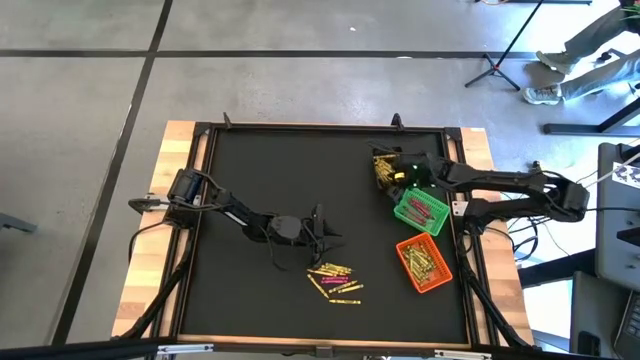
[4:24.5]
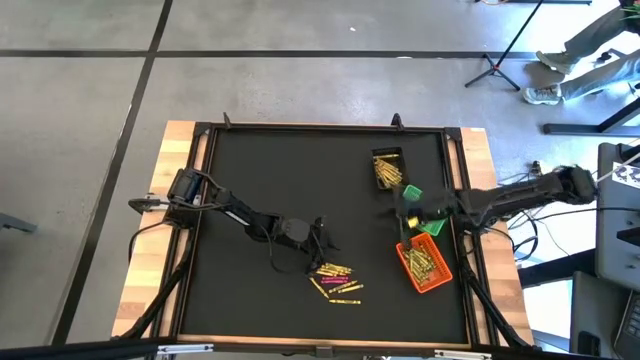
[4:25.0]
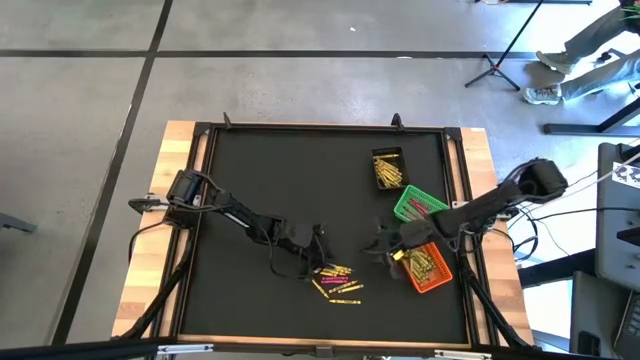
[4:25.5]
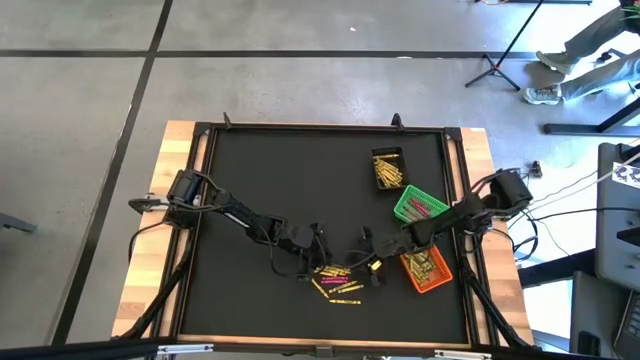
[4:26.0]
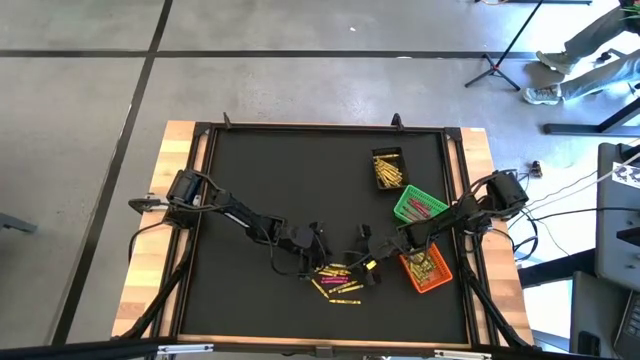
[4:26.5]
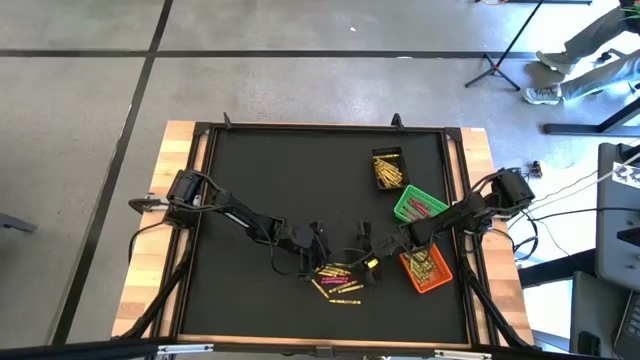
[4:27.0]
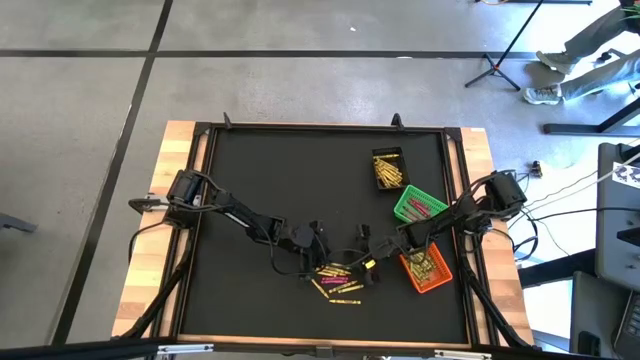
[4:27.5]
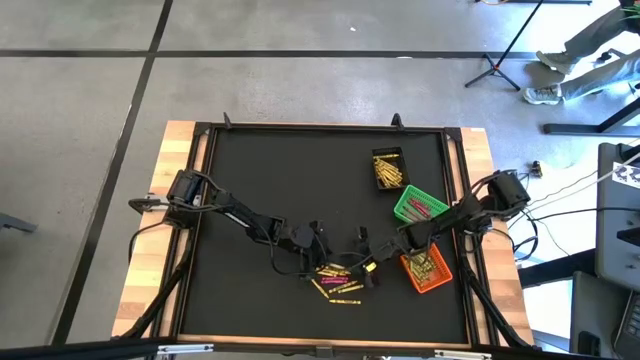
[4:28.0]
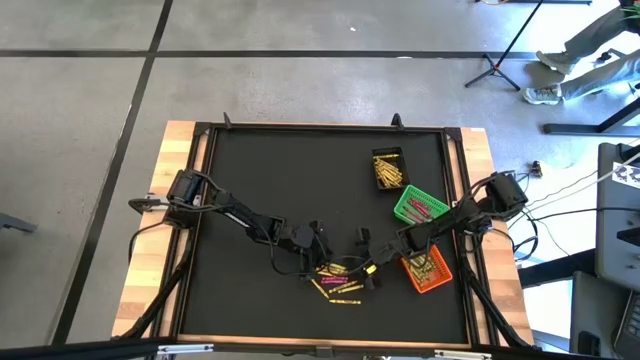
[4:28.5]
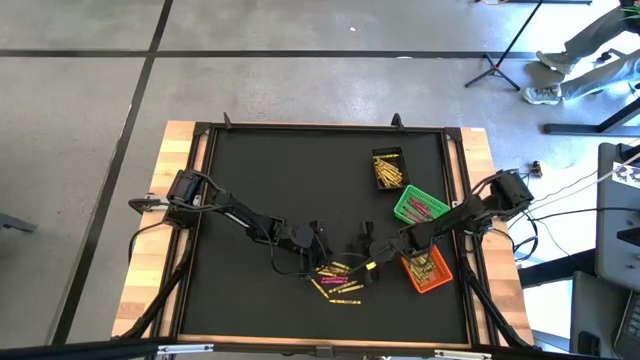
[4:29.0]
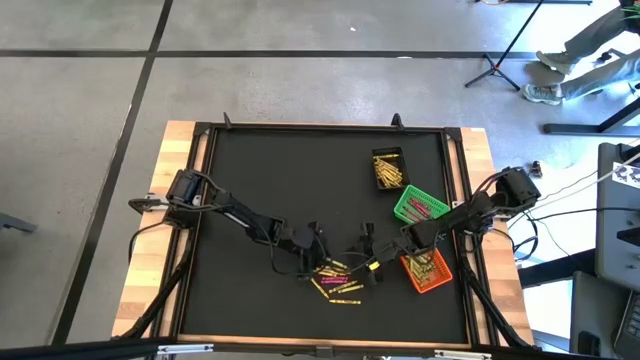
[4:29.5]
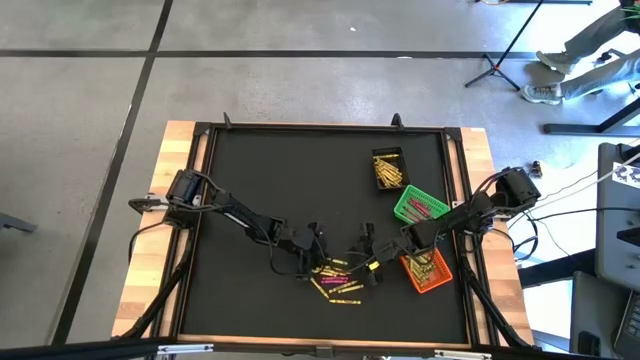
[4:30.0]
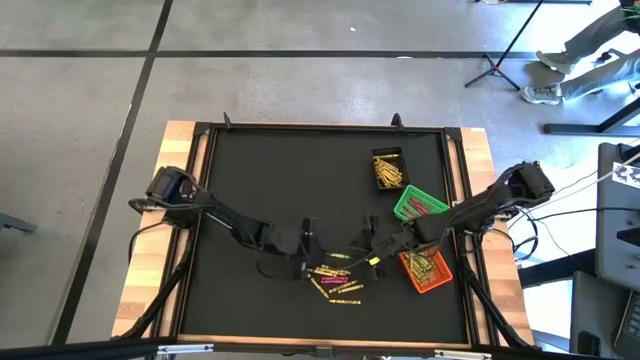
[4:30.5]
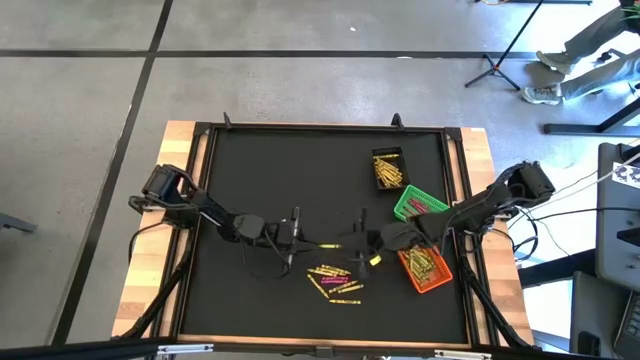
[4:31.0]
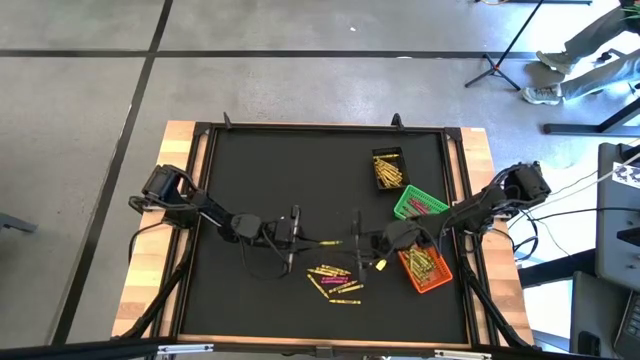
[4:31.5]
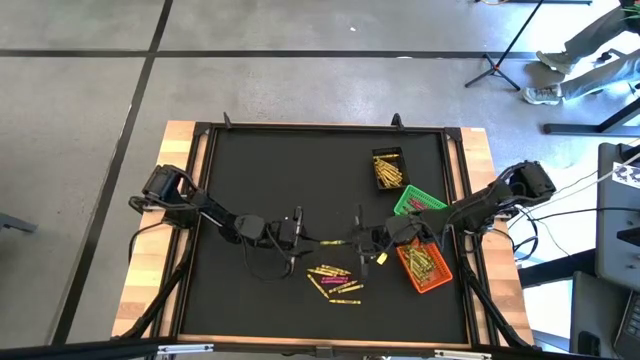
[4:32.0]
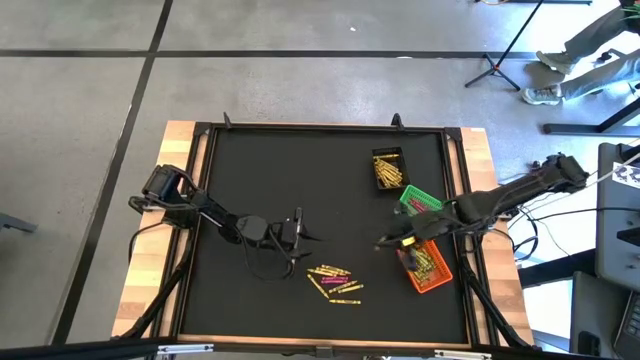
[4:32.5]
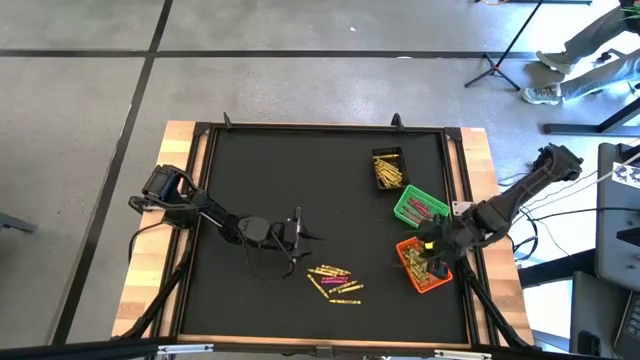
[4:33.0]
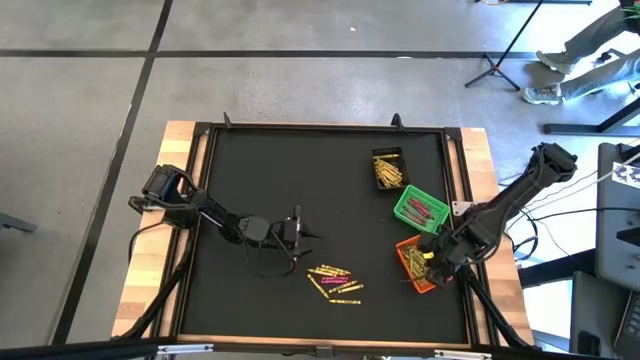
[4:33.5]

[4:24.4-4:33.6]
Task: Sort crayons
Put the green crayon into the orange basket

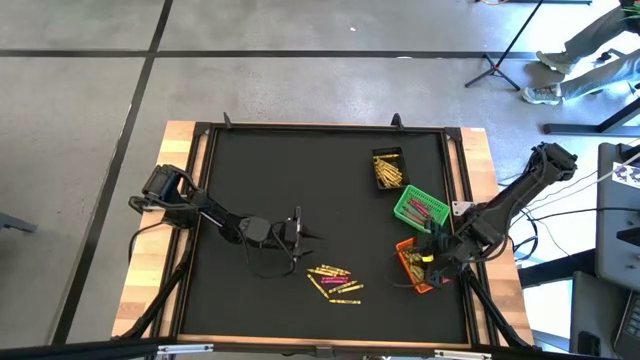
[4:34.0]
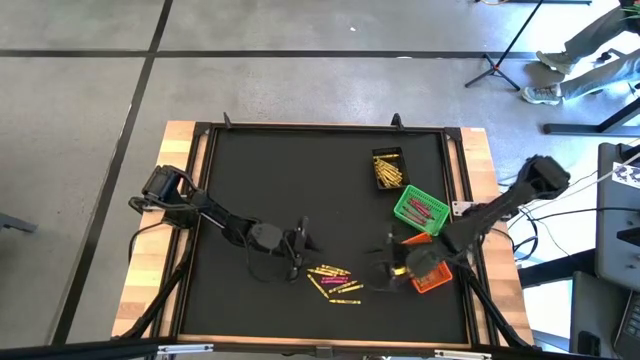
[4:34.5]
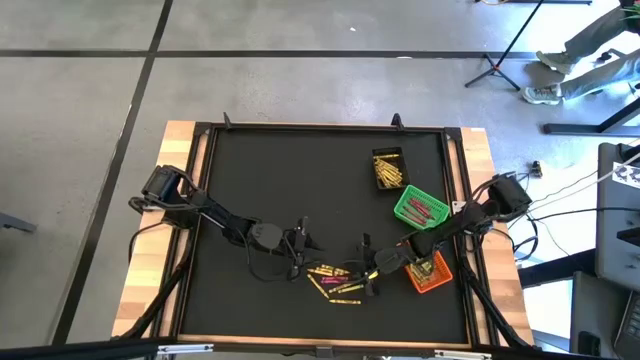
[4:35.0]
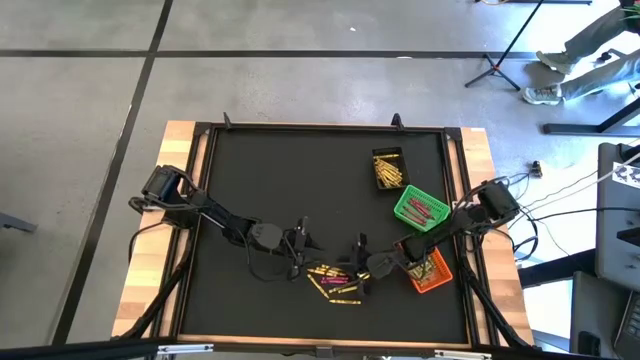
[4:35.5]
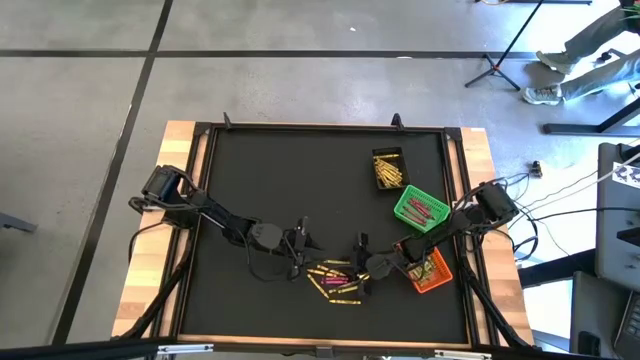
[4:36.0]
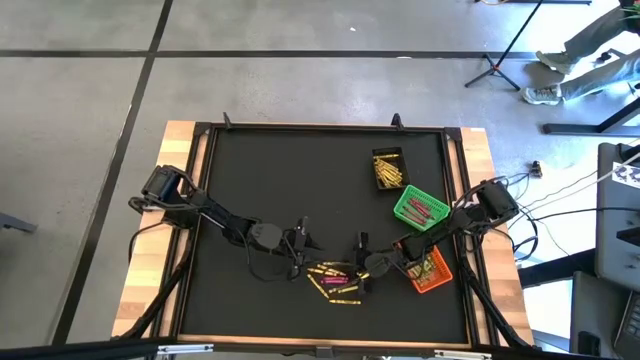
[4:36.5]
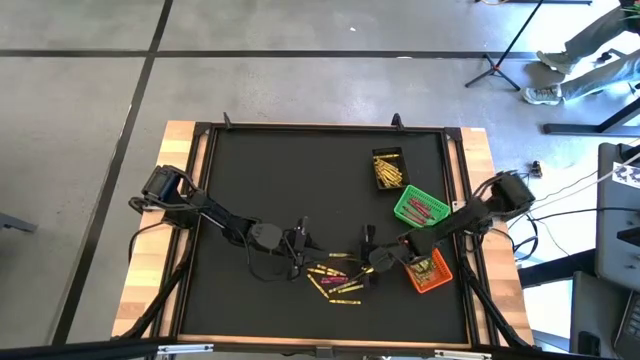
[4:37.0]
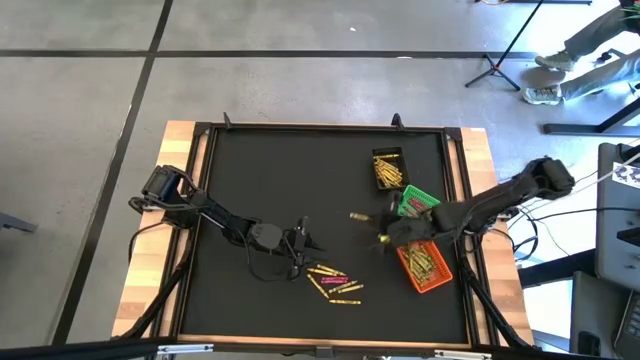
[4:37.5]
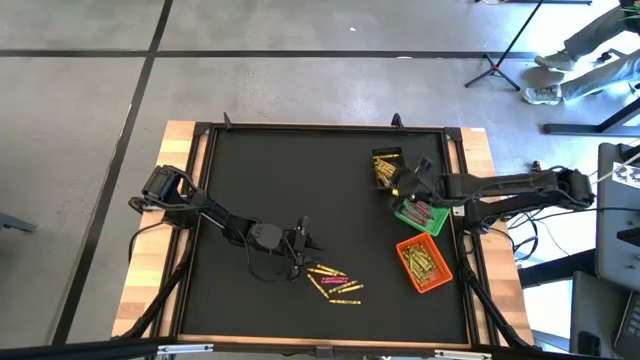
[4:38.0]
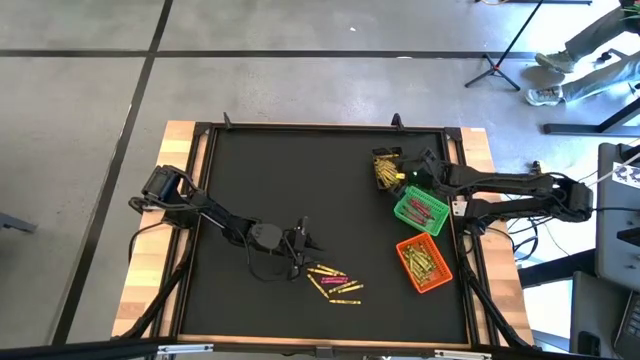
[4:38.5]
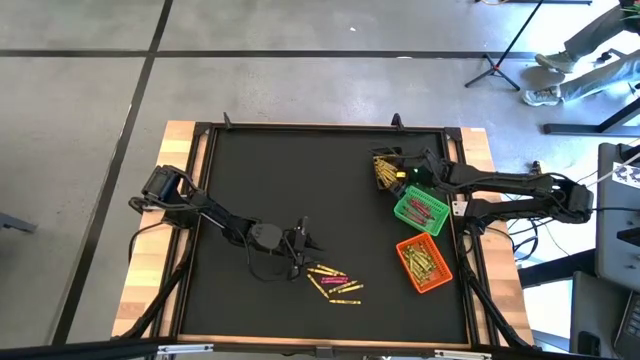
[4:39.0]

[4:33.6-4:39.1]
Put the yellow crayon into the black basket

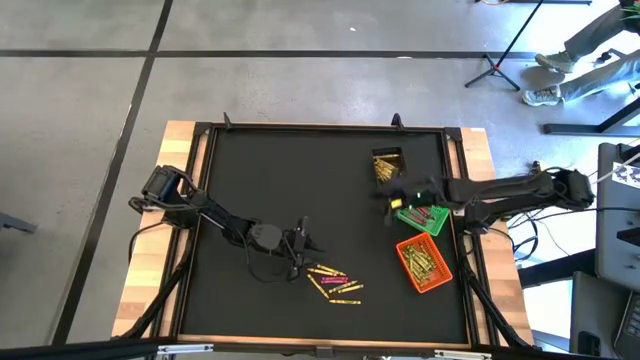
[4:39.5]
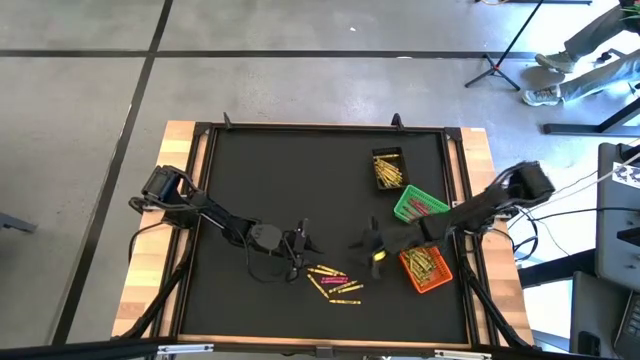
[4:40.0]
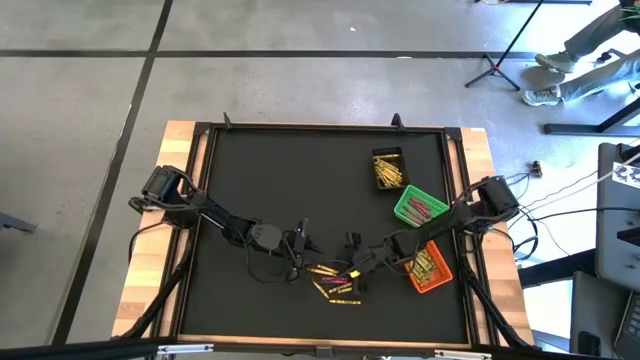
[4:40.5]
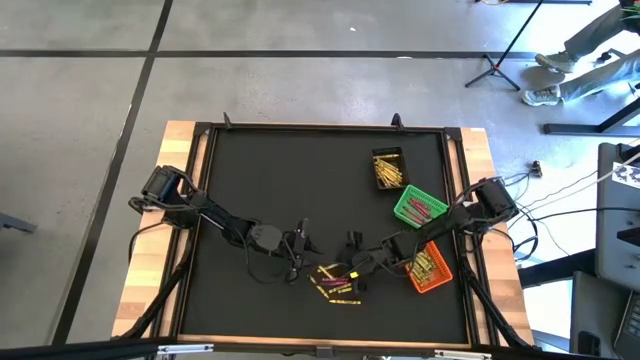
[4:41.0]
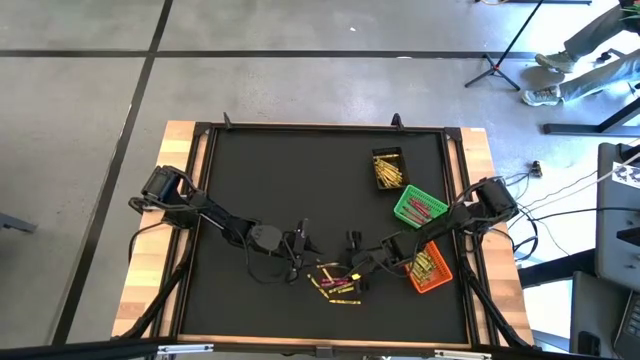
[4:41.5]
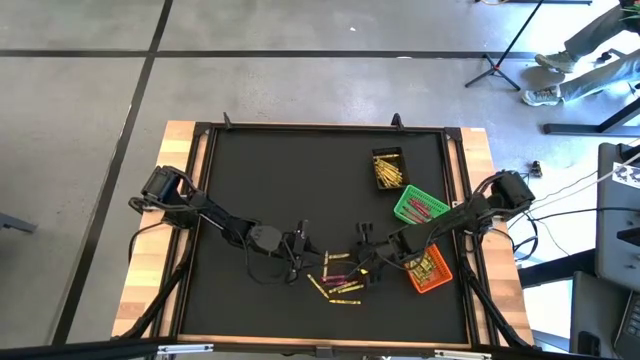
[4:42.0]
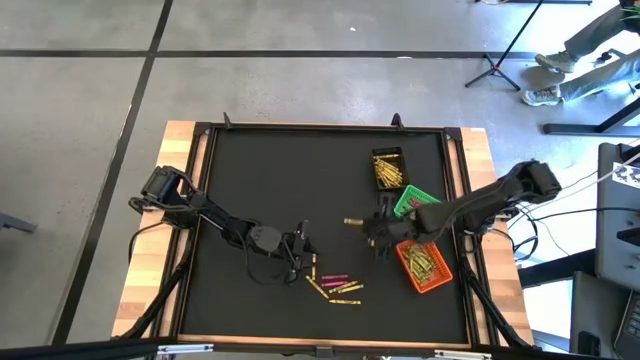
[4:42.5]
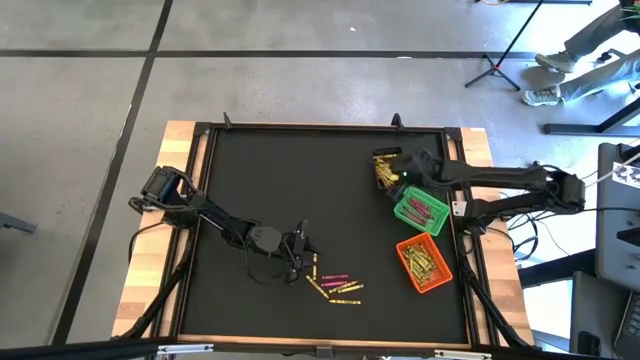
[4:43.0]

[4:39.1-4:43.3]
Put the yellow crayon into the black basket

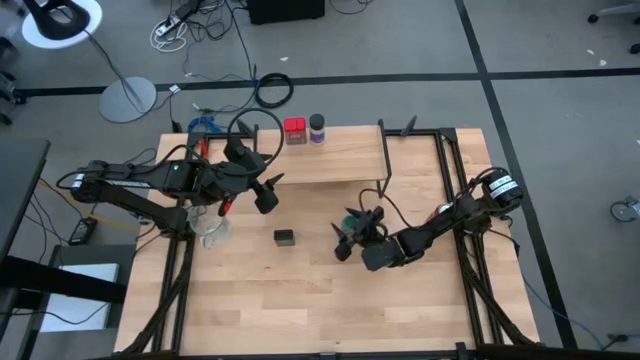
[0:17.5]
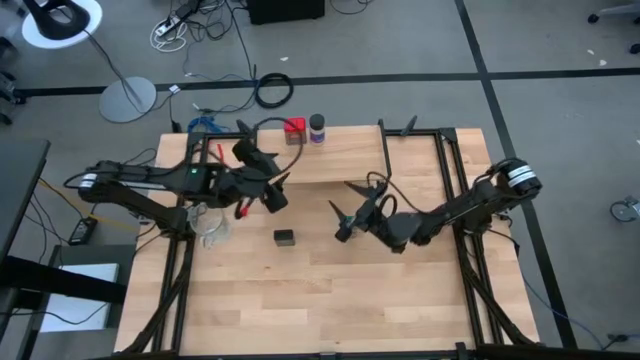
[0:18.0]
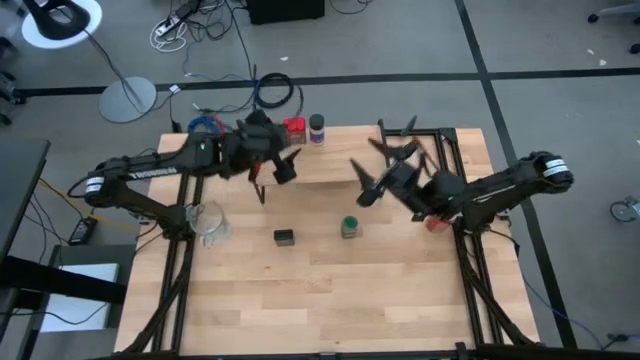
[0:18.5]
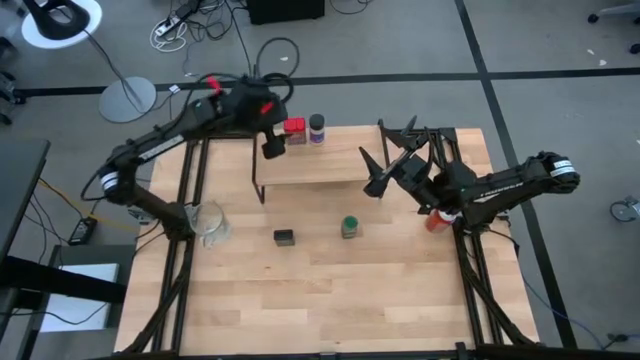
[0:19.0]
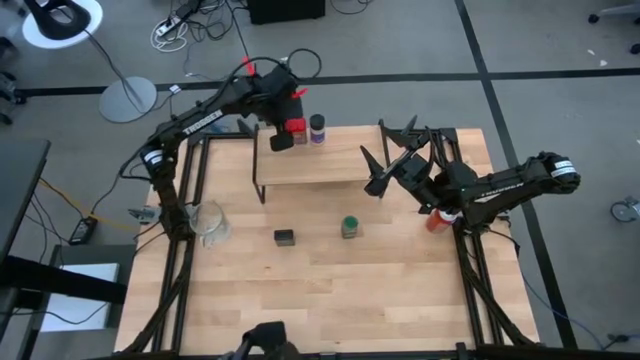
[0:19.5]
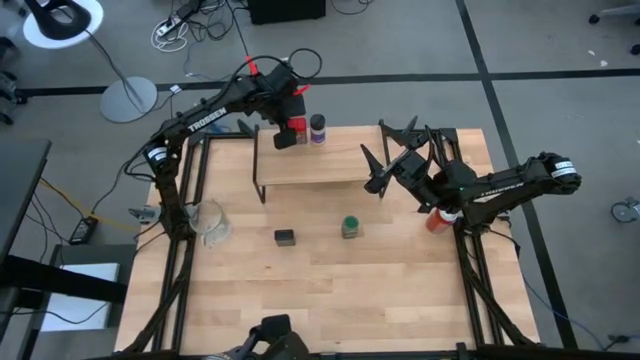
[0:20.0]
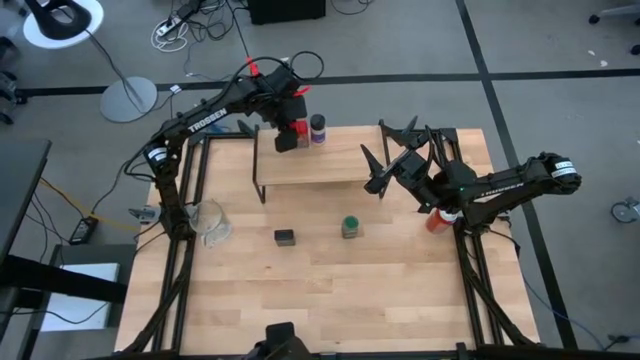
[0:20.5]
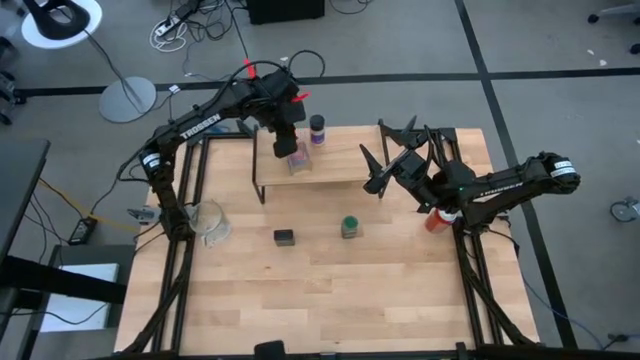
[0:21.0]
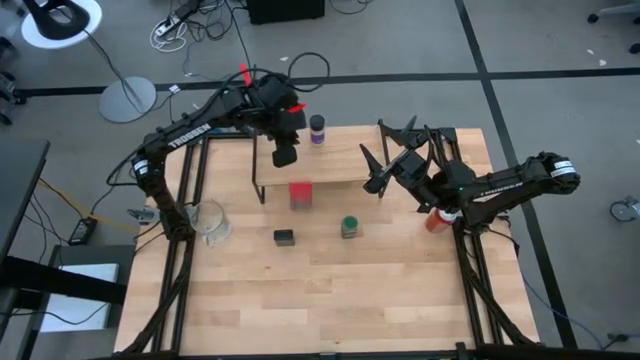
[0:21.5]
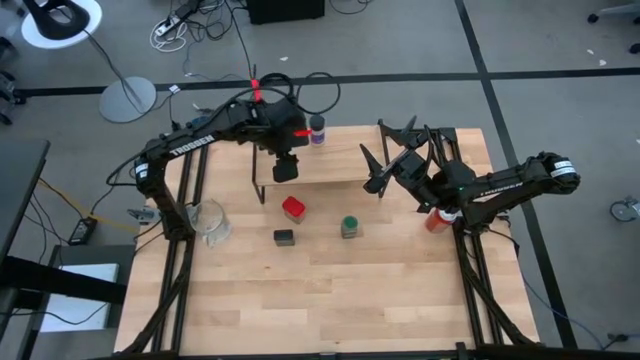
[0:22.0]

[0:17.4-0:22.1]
Task: Shelf spices
Remove the red seasoning can from the shelf
